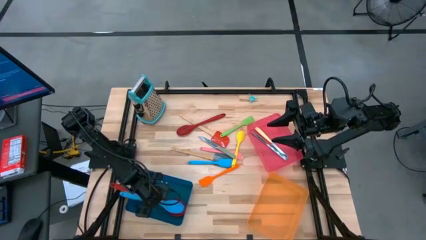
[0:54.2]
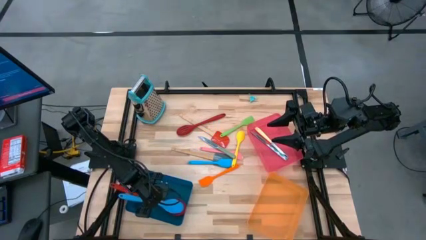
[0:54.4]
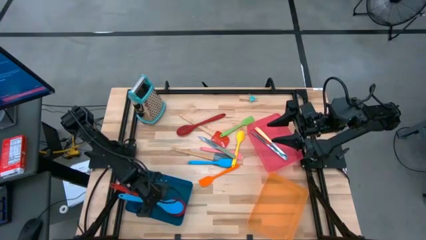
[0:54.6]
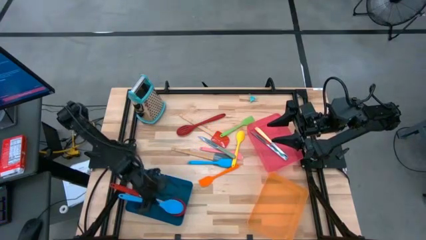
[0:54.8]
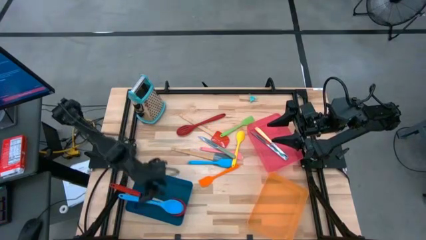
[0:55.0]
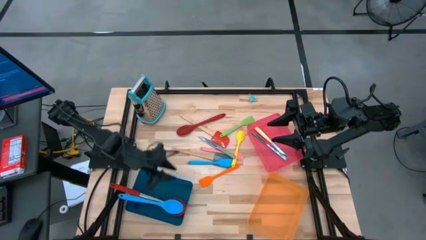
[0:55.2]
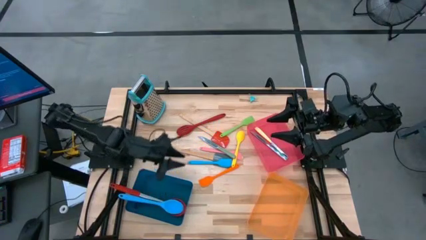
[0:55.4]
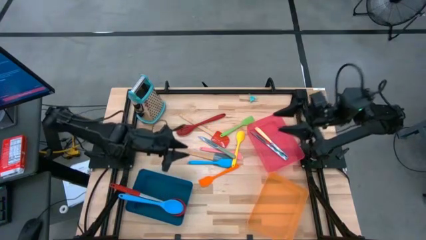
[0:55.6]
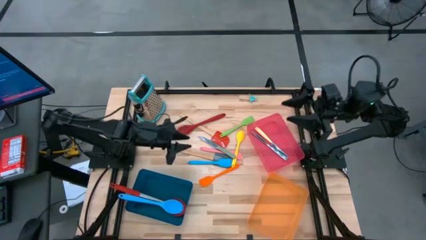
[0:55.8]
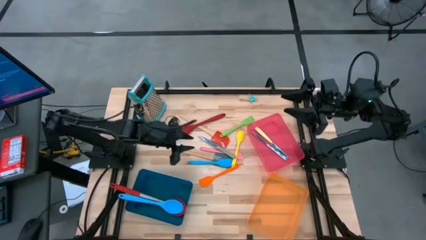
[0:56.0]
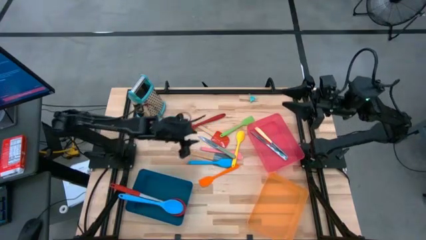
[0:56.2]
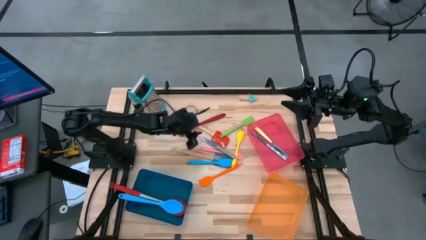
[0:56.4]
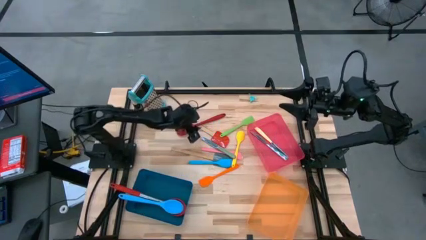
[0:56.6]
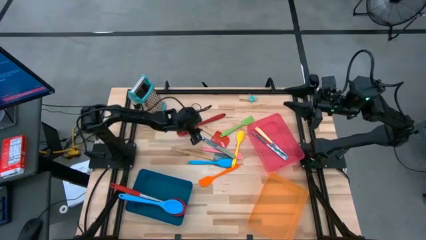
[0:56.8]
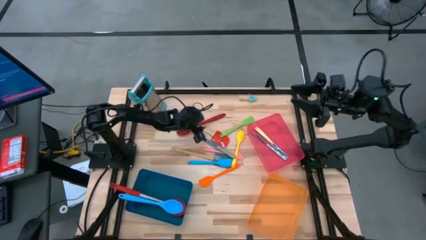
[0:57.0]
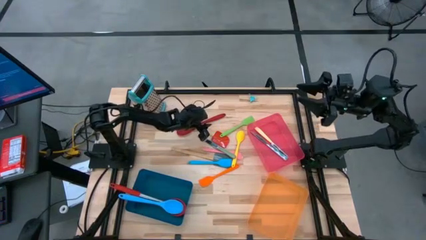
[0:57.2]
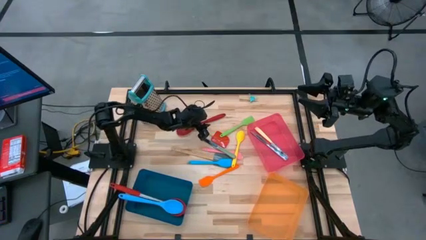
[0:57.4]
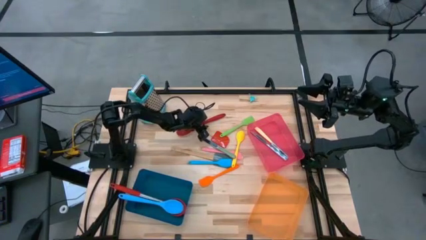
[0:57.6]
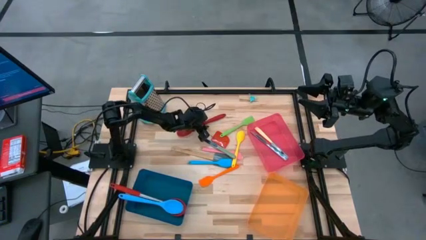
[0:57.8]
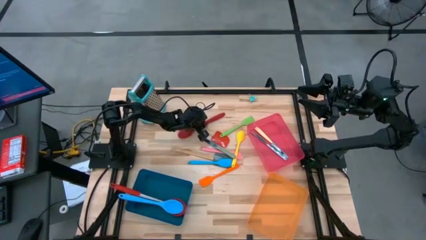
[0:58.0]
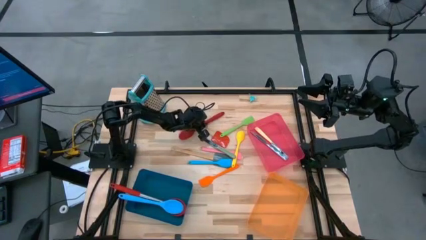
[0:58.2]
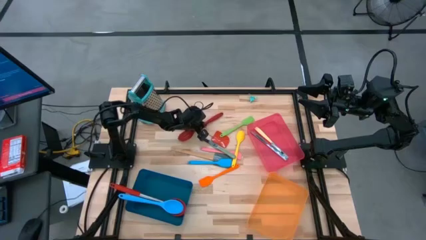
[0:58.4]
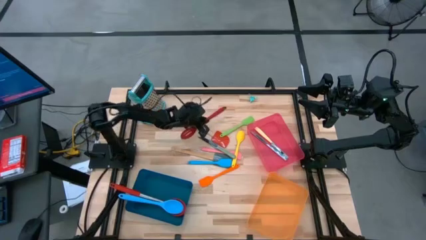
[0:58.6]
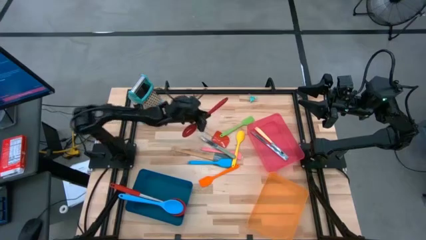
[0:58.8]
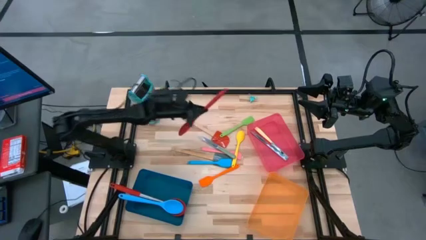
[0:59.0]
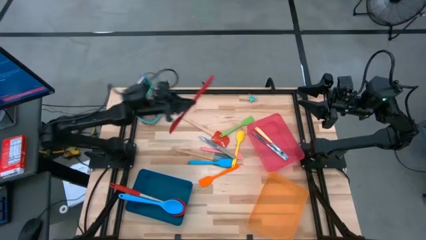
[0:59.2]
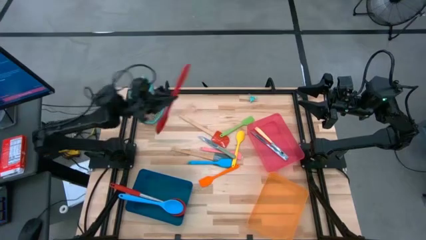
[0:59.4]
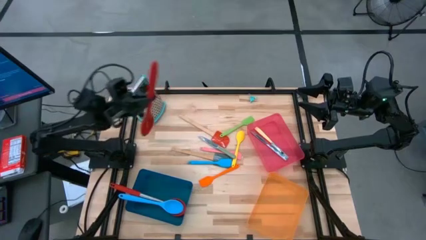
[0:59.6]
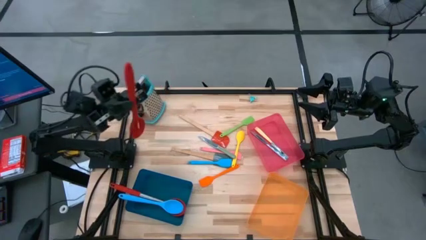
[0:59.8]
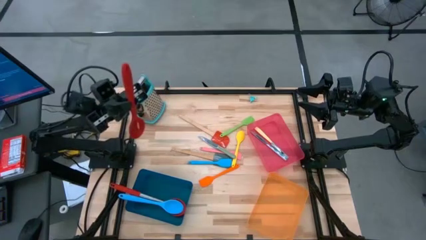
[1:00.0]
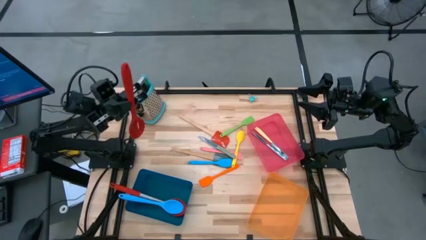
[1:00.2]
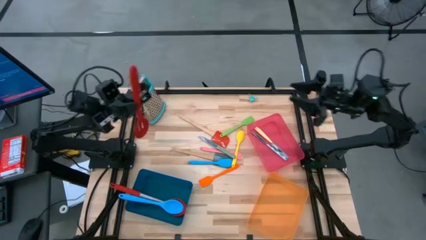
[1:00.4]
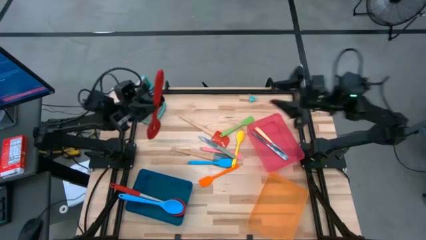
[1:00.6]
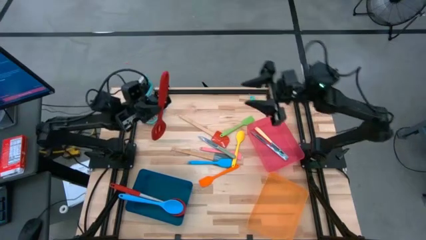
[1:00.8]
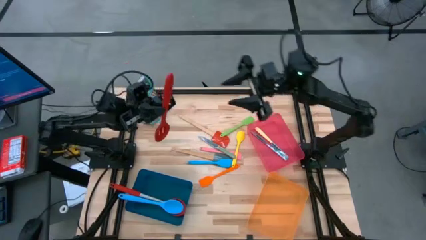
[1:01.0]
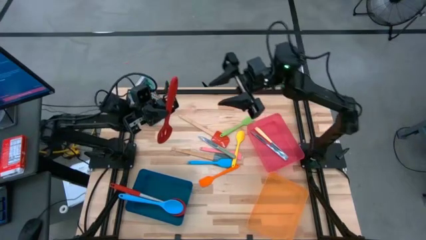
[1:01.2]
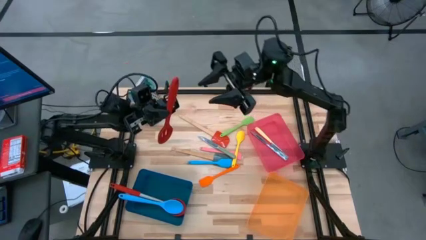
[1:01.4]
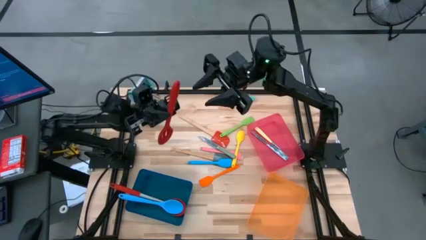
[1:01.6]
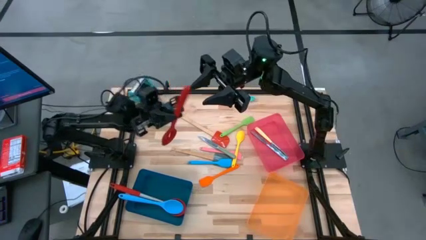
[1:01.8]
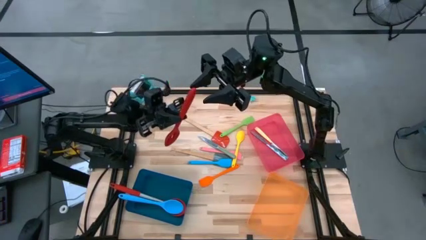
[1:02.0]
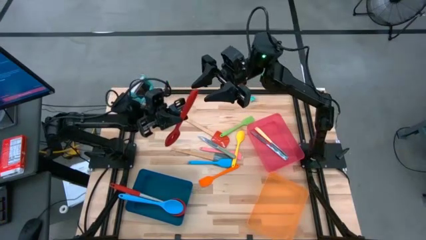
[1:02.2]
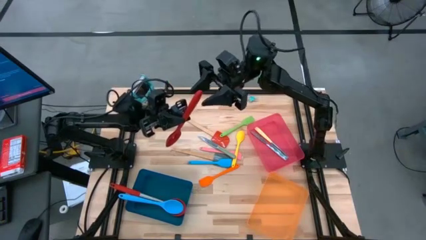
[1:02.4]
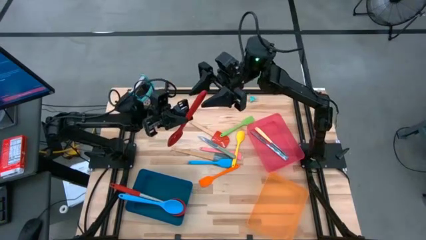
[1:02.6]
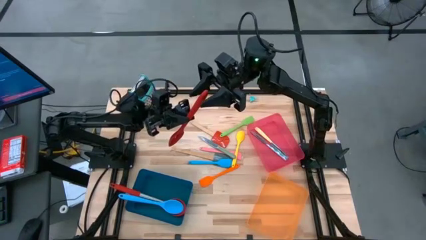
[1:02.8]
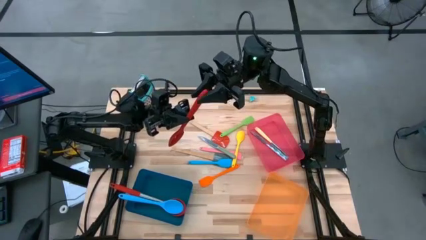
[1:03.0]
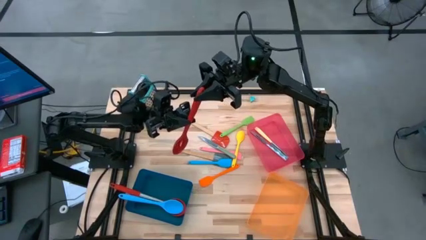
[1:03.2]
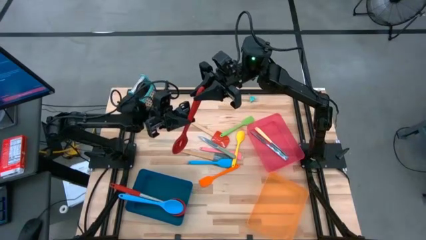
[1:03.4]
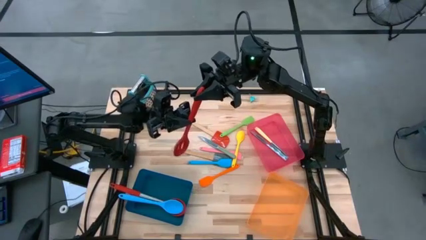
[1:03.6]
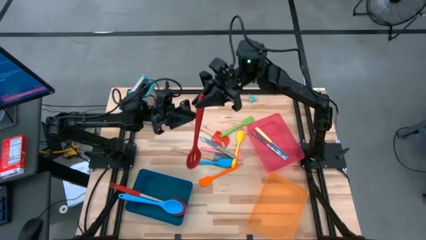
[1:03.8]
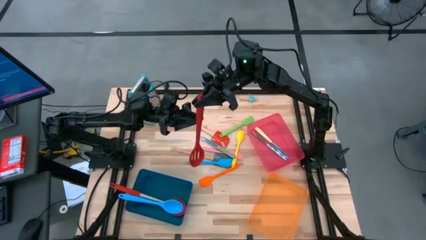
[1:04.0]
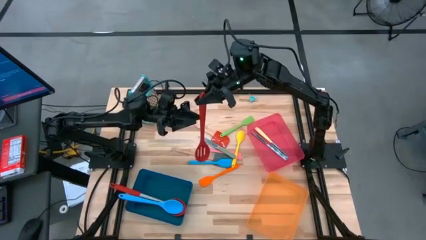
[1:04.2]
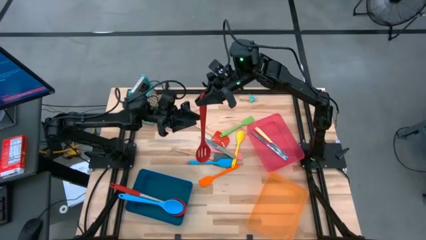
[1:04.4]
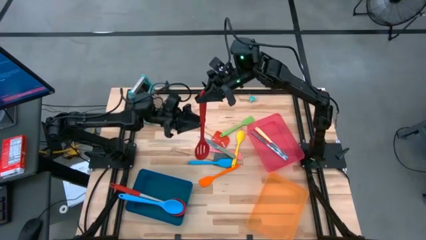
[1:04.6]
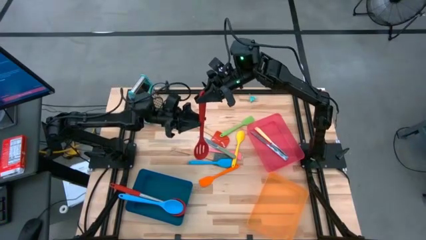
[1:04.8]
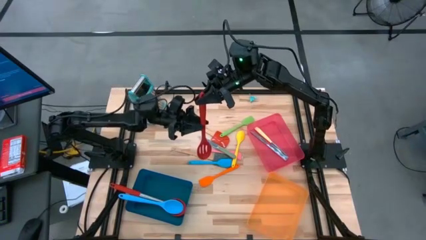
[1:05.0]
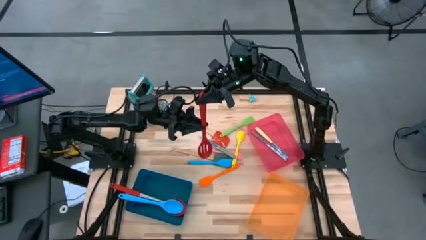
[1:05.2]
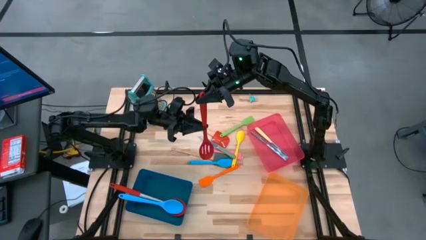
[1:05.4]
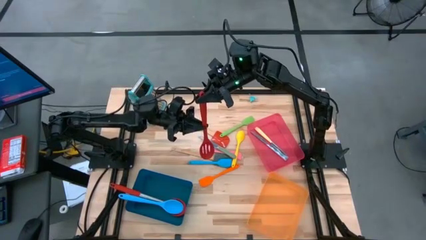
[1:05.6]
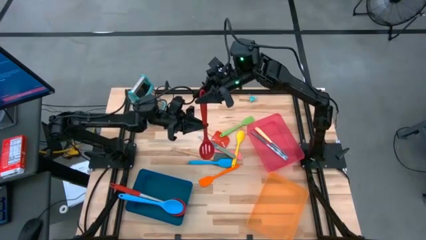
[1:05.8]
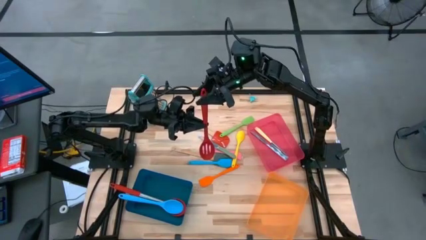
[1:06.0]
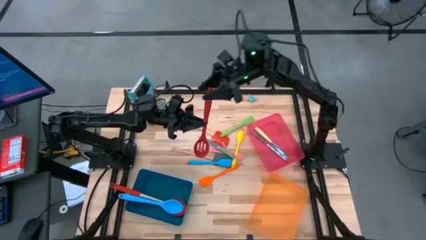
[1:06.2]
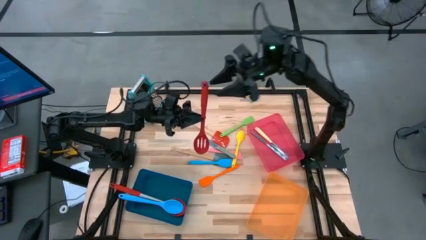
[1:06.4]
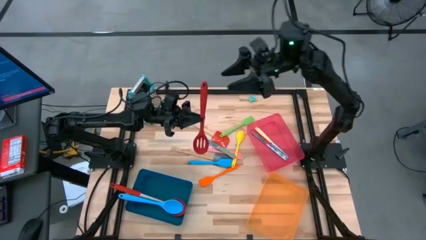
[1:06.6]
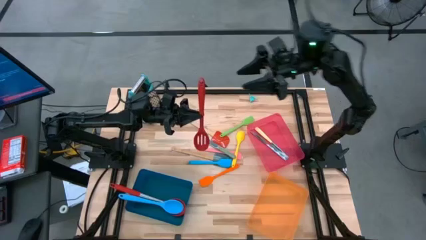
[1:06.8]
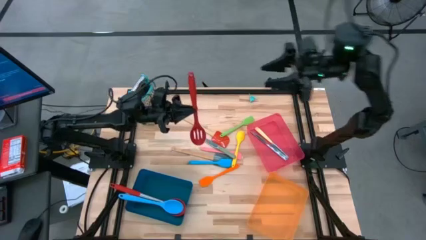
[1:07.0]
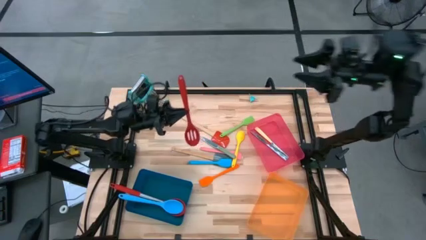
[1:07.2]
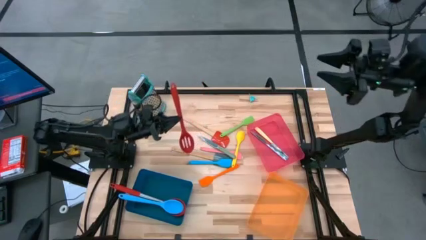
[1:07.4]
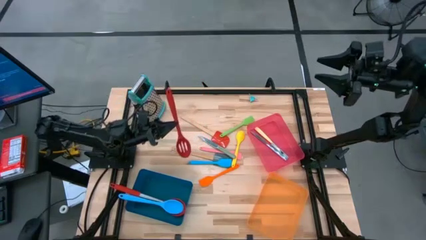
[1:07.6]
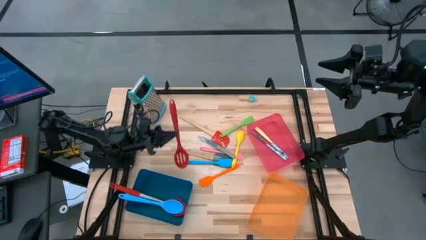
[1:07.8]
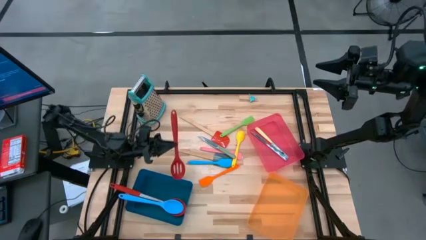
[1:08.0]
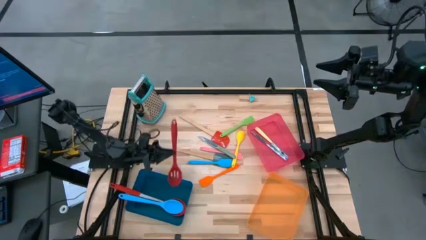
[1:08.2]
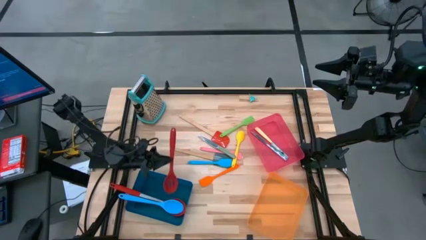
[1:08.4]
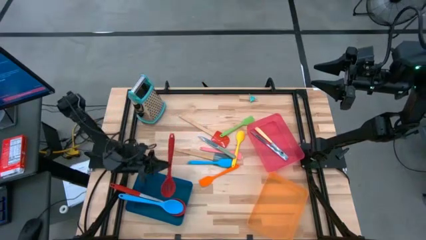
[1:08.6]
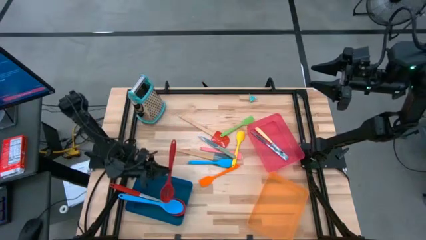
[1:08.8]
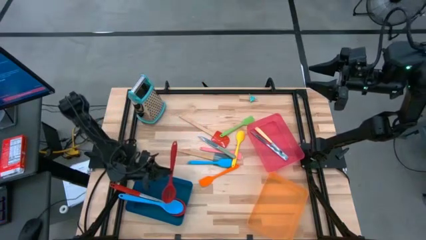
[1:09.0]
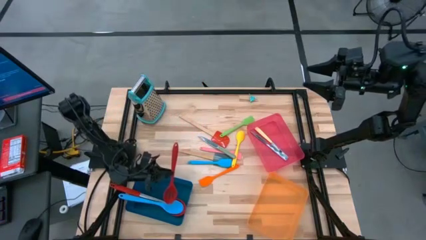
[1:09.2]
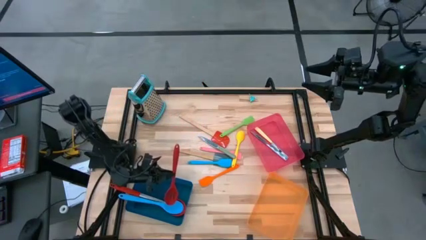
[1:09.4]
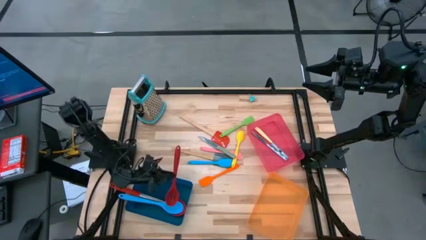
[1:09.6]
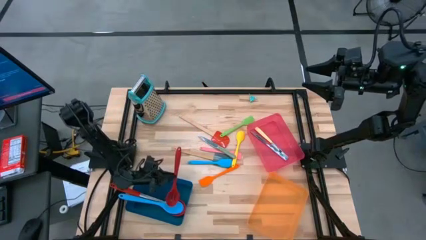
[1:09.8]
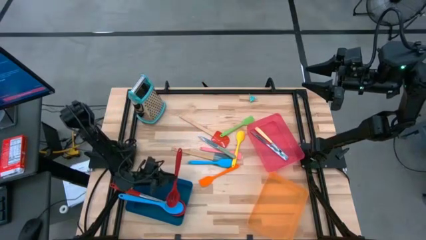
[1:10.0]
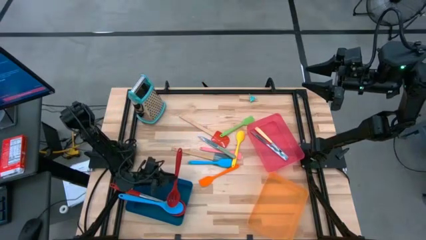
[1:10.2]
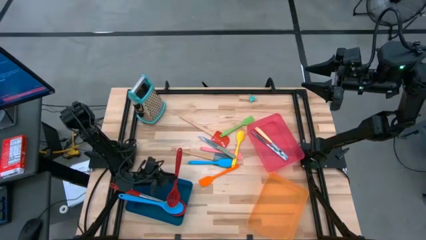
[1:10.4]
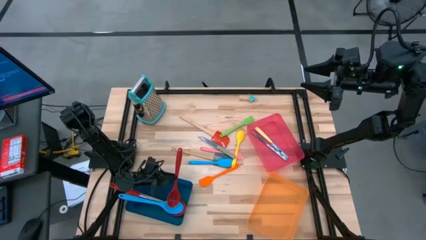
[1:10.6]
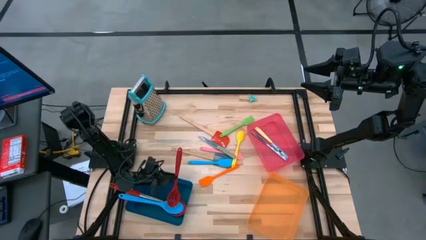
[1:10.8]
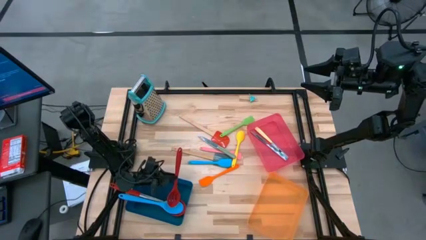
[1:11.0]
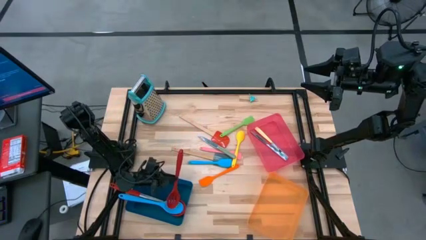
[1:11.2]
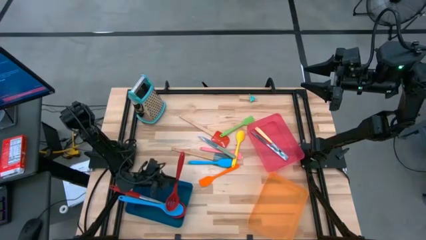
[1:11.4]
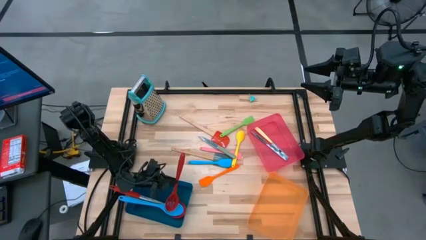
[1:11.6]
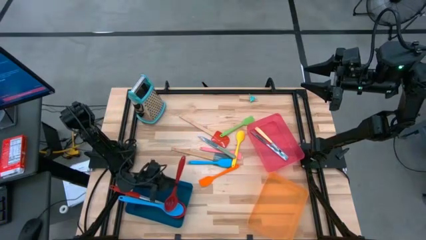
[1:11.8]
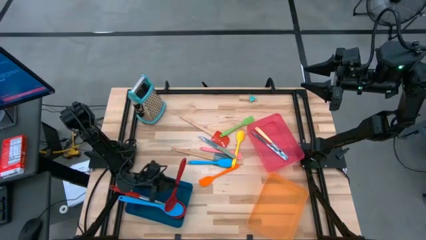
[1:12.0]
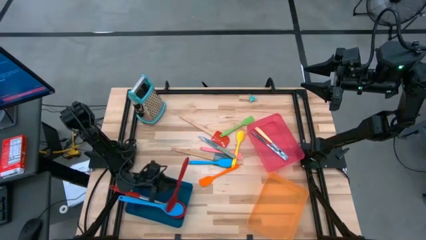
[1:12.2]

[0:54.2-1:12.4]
Task: Pick & Place Kitchen Items
Put the red serving spoon into the blue bin
